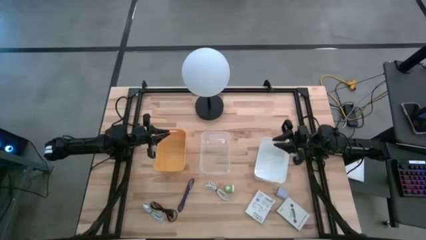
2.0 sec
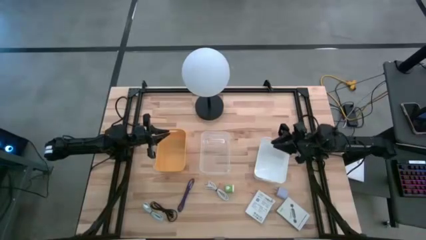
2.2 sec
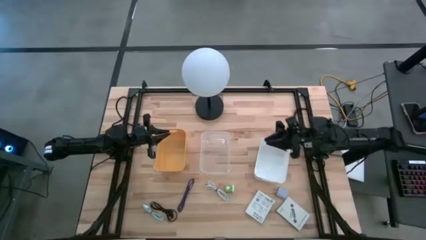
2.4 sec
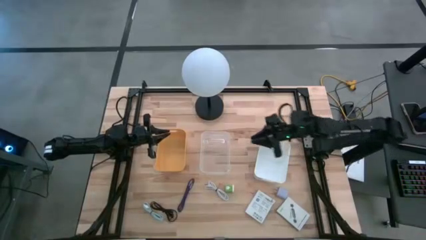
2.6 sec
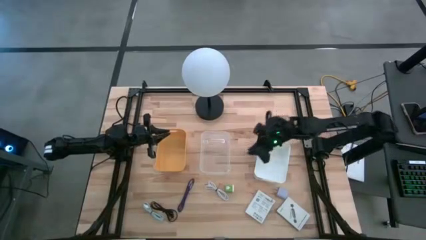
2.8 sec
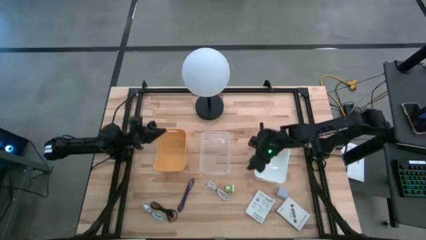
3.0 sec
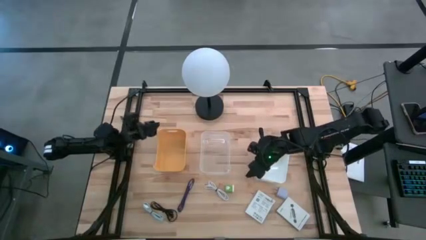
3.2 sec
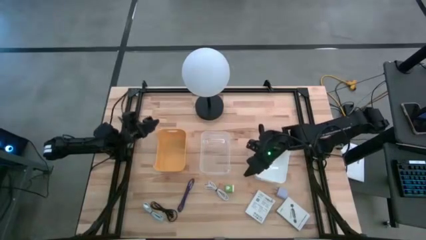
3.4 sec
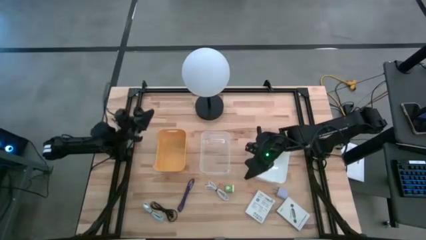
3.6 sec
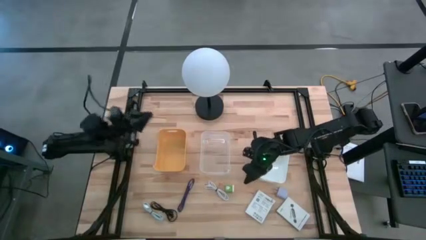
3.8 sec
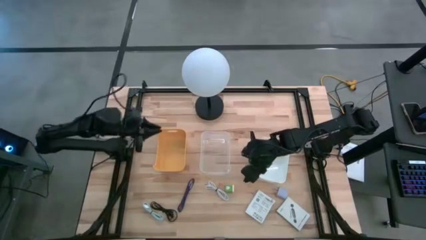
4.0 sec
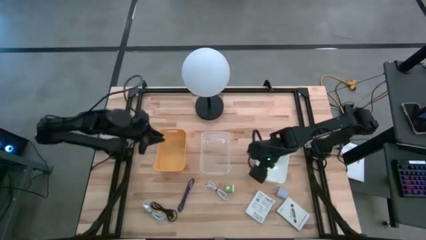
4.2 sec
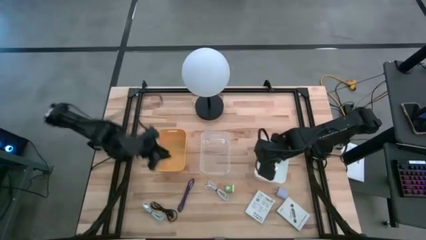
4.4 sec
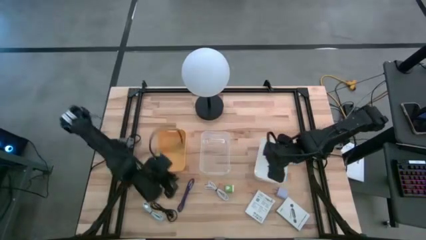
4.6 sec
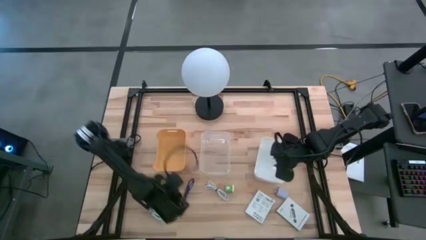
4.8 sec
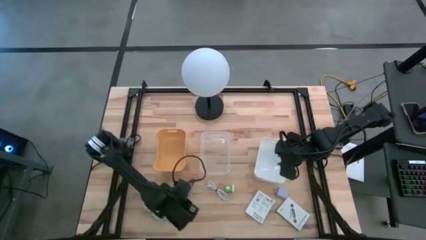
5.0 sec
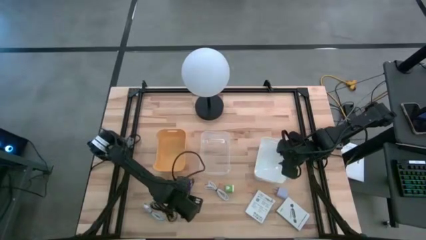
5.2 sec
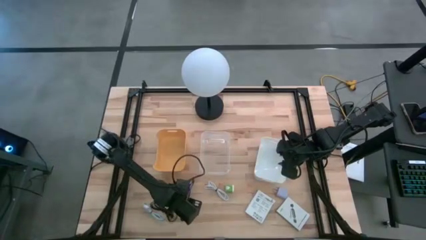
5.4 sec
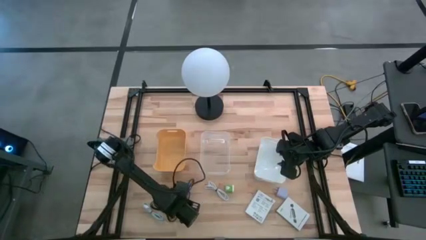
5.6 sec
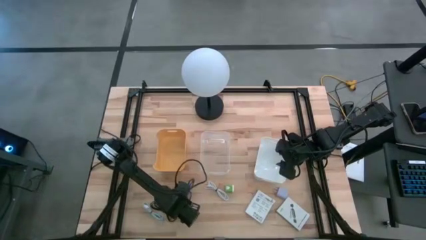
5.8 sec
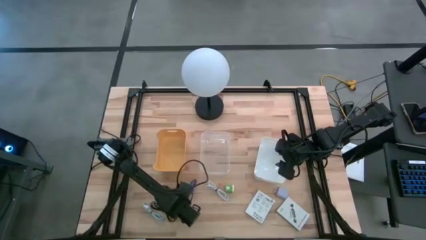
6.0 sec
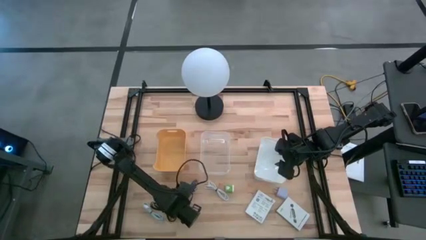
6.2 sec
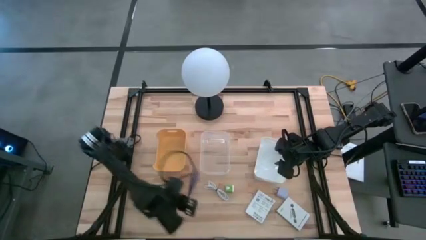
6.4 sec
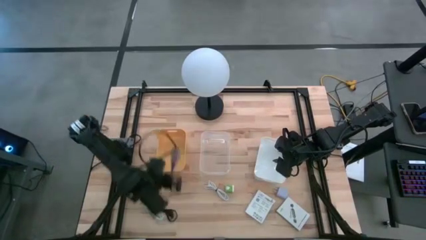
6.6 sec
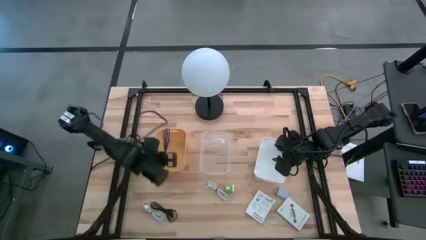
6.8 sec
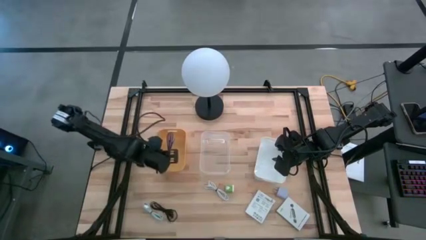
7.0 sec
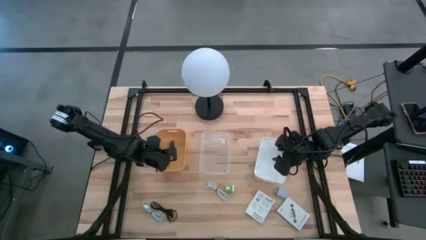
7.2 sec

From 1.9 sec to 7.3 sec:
Task: Pick and place items into bin
Put the blue USB cable into the yellow bin

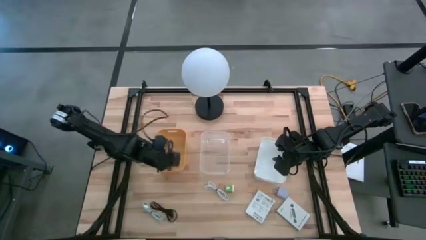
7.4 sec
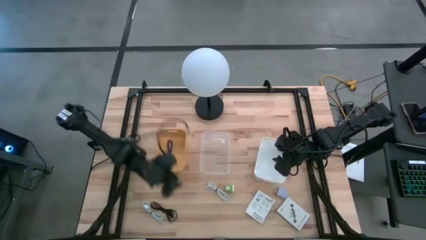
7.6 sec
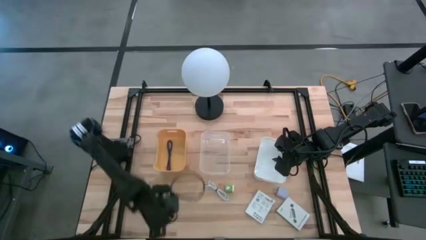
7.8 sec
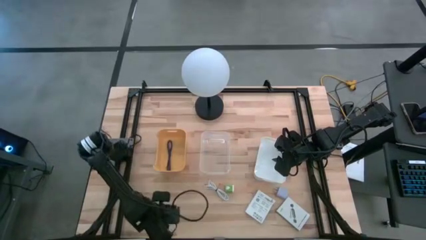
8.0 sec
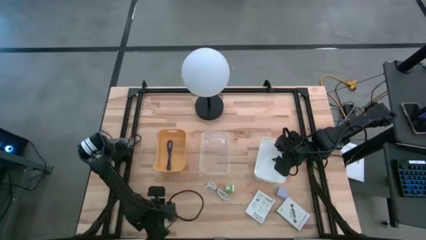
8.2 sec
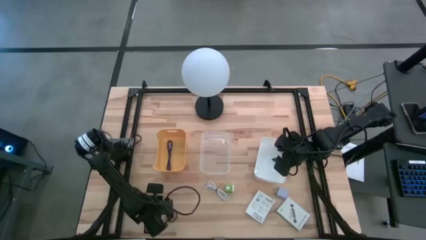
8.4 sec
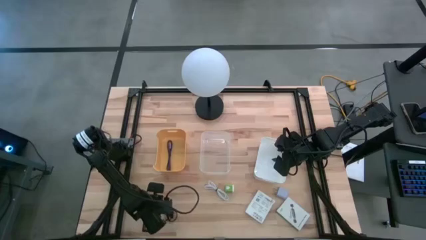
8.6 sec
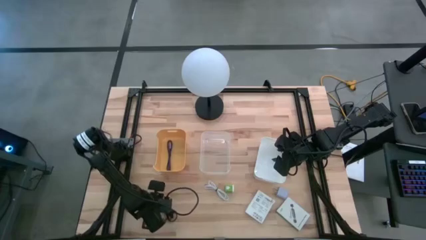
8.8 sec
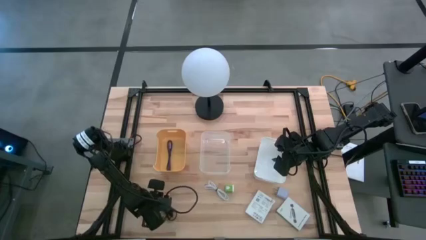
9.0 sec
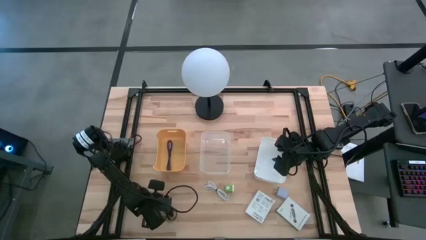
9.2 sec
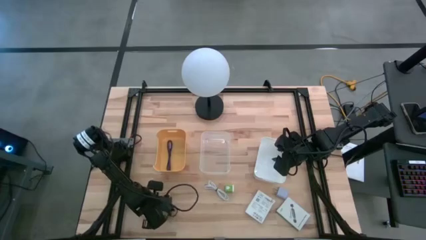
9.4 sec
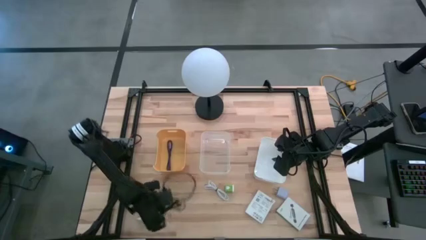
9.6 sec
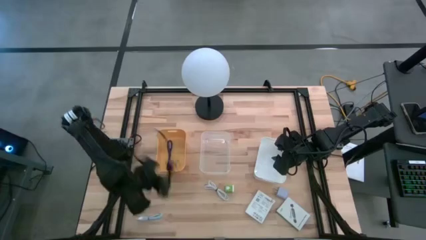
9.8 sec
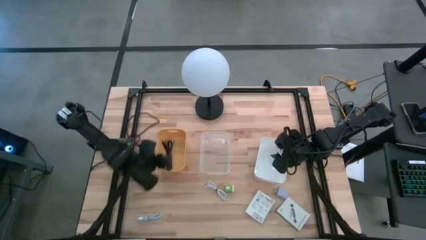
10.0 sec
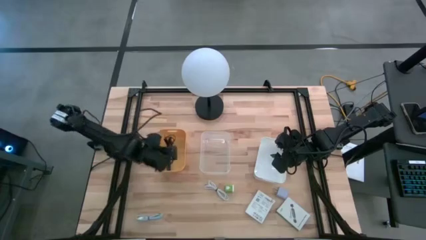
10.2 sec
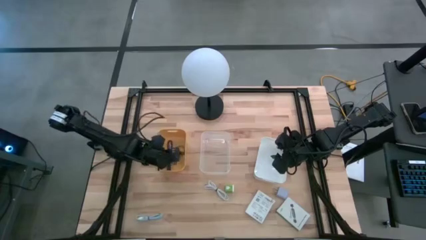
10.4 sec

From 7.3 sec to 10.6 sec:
Put the black USB cable into the yellow bin

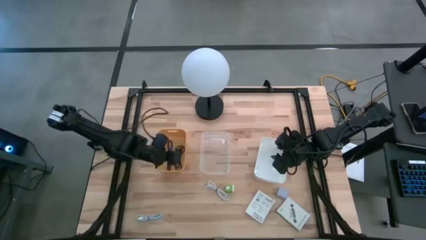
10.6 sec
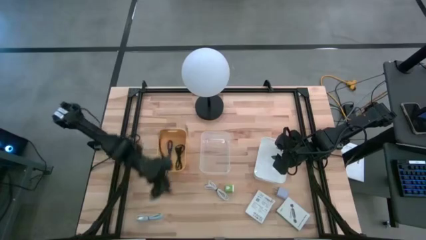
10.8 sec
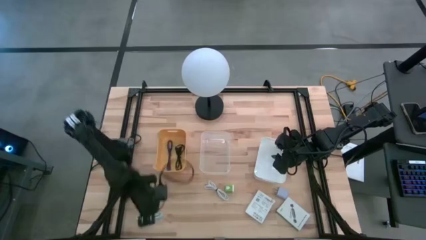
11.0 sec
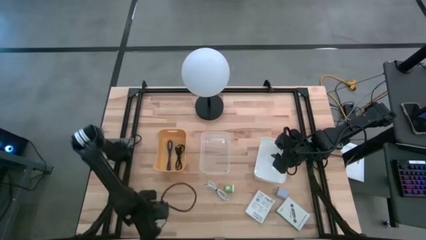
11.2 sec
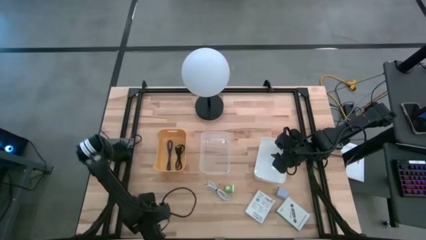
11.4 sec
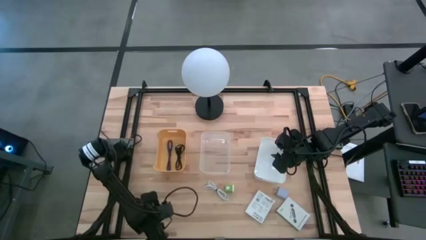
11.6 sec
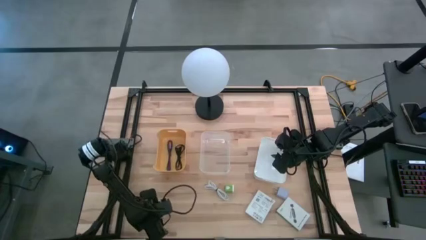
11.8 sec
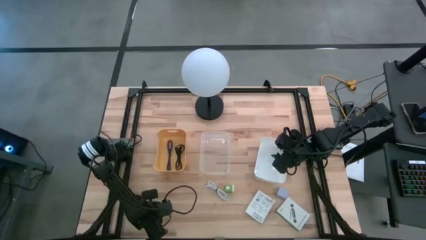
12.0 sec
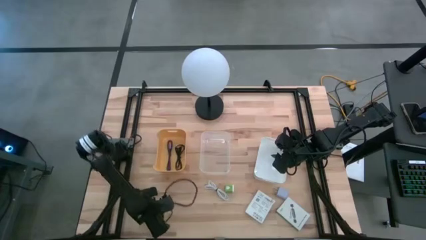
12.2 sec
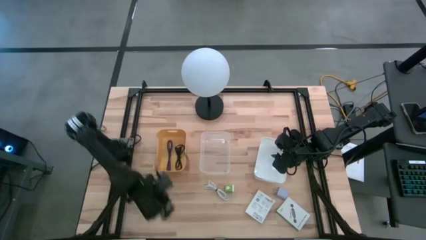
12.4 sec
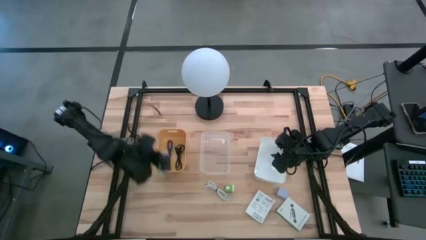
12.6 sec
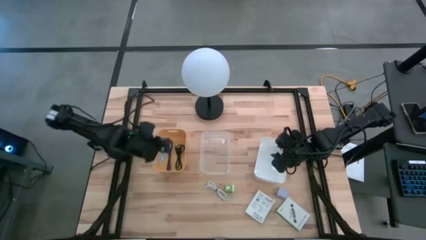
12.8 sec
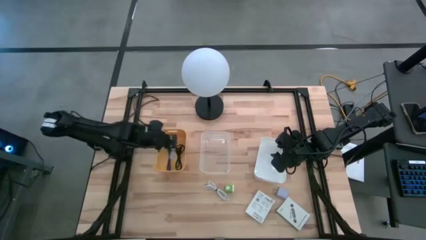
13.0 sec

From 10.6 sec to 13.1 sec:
Put the light blue USB cable into the yellow bin

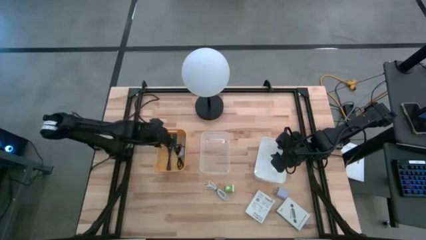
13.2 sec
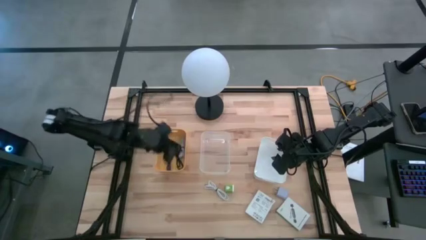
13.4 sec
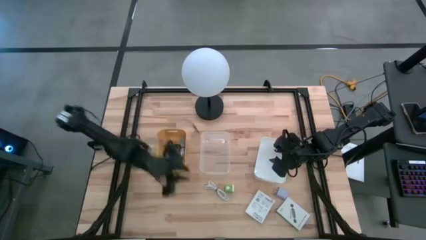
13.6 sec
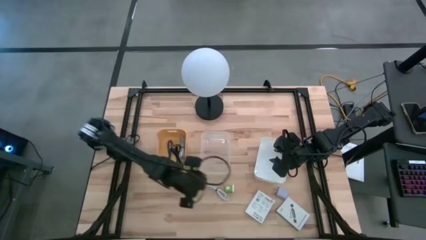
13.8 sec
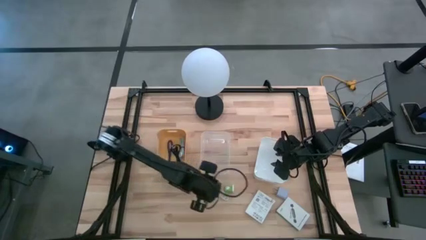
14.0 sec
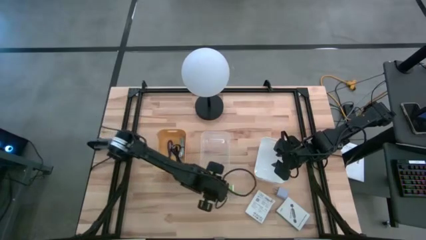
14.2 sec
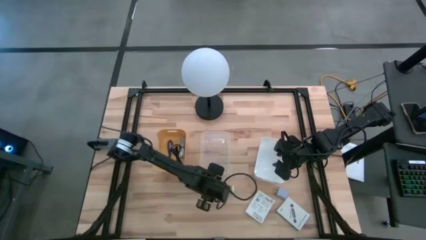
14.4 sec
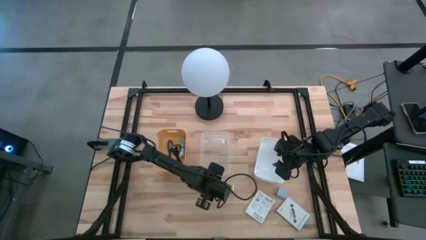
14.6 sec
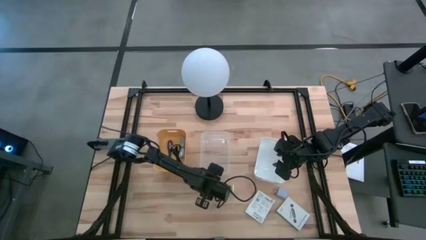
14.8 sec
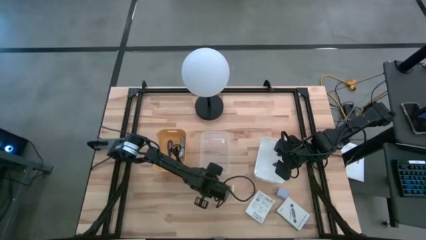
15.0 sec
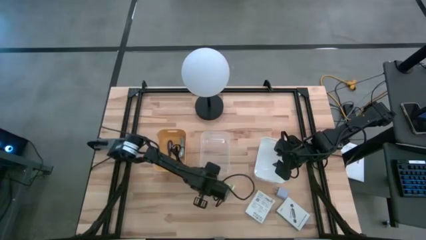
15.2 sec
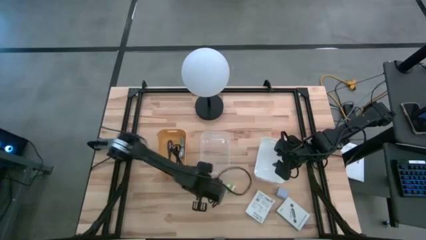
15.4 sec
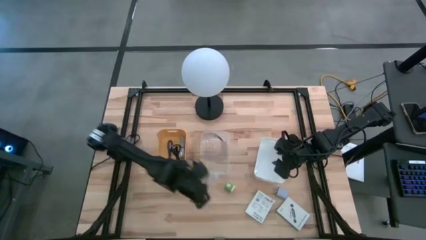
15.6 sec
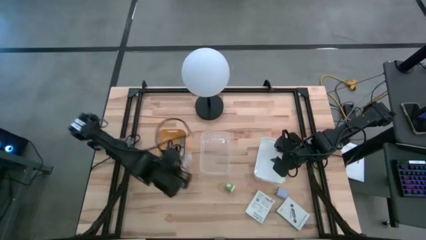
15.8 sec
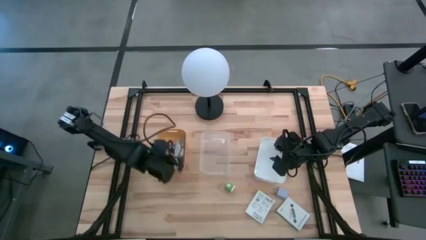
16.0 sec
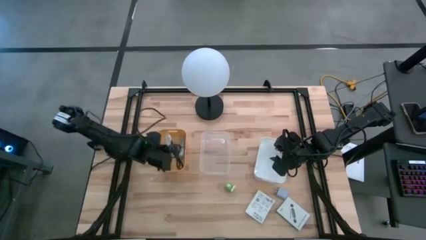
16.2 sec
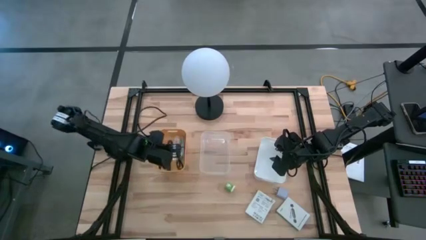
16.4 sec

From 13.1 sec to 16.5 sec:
Put the white USB cable into the yellow bin

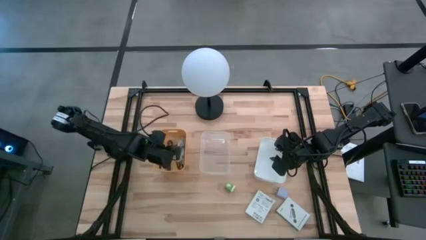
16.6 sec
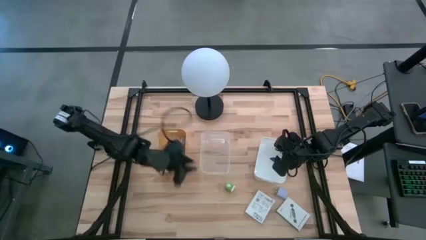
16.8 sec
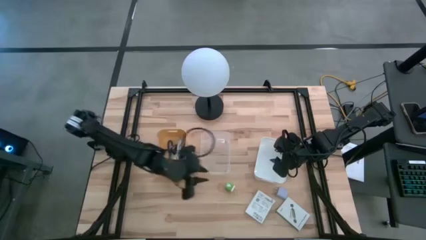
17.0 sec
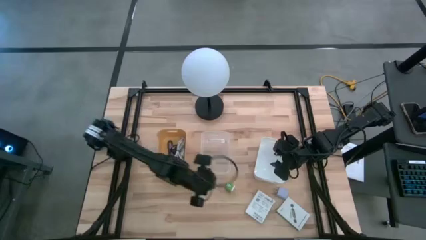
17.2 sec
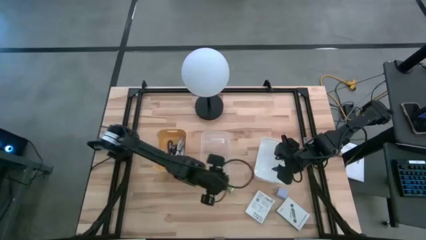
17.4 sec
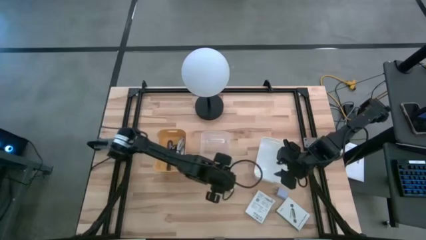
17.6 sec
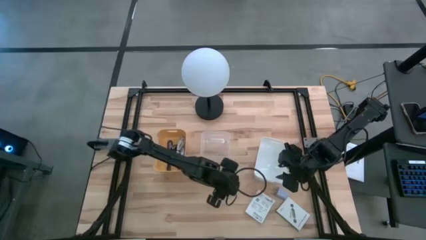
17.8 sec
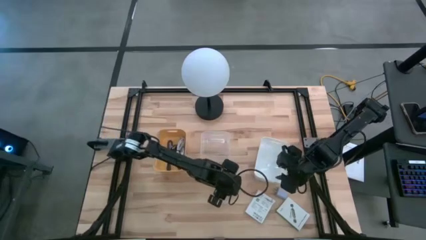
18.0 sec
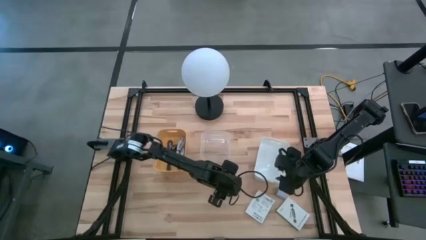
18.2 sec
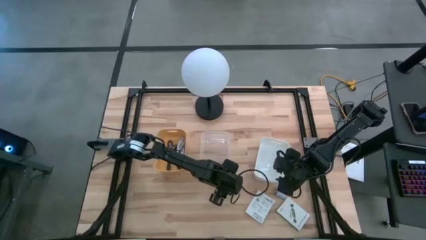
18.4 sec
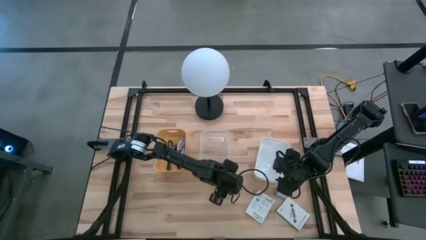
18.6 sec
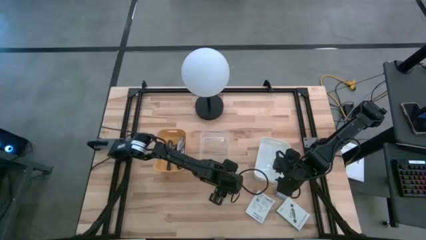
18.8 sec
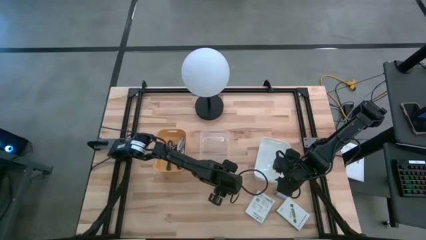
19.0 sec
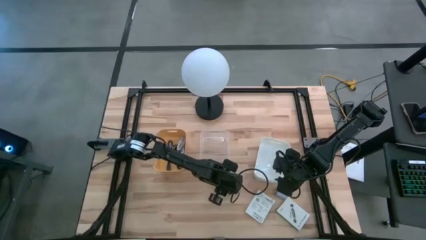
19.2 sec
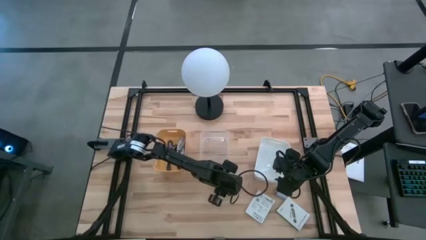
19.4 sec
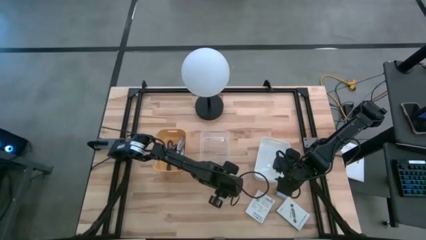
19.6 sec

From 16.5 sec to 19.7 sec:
Put the green charger adapter into the transparent bin
